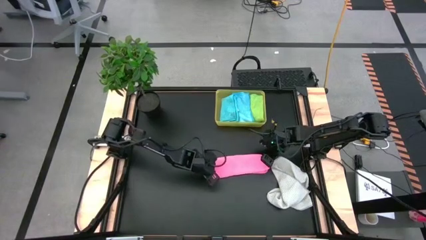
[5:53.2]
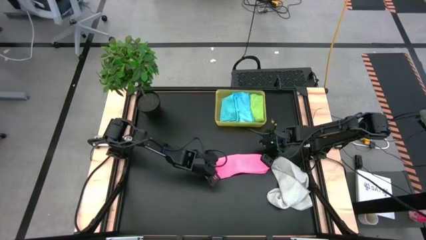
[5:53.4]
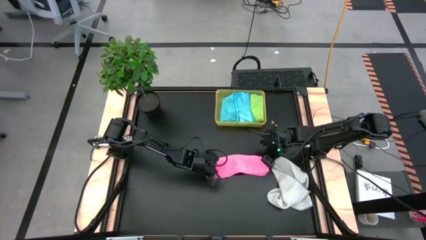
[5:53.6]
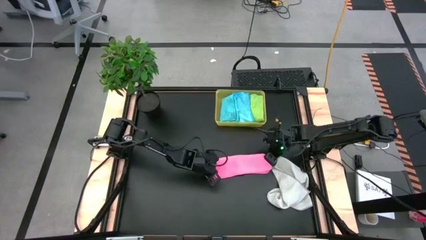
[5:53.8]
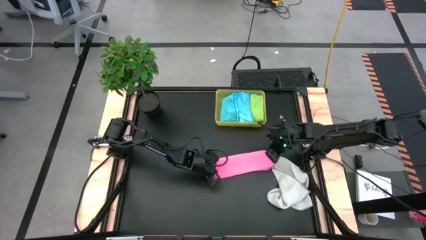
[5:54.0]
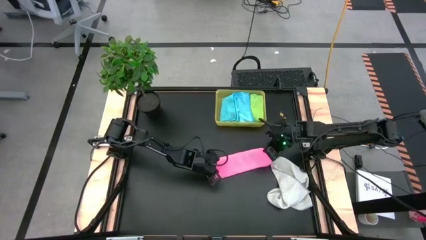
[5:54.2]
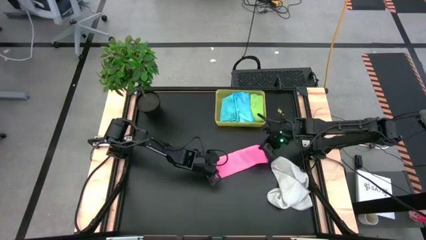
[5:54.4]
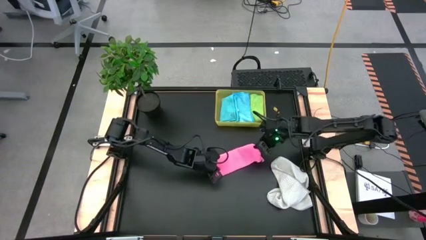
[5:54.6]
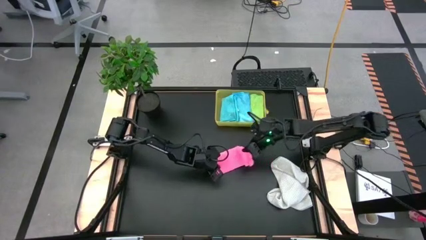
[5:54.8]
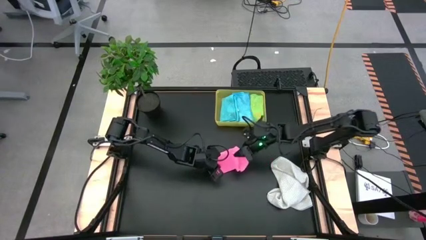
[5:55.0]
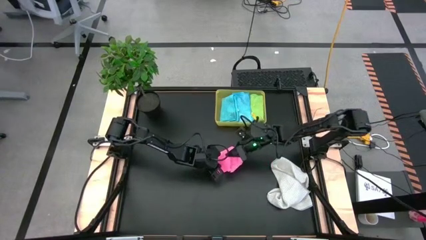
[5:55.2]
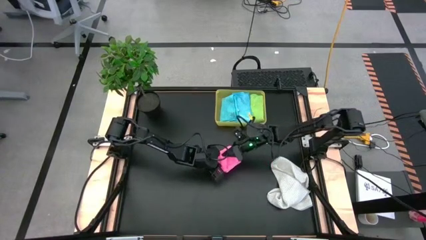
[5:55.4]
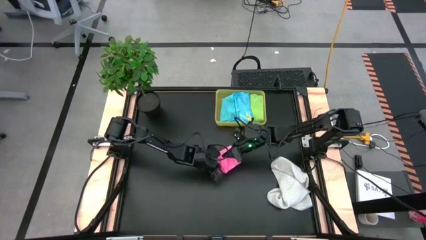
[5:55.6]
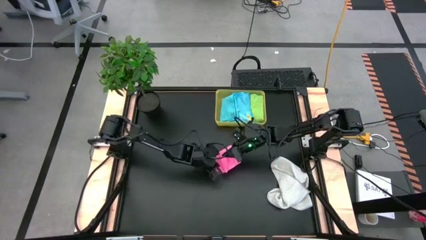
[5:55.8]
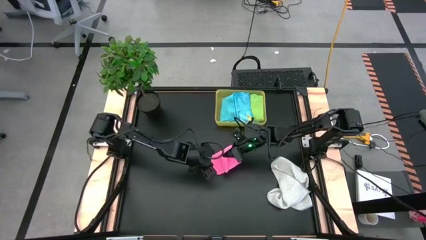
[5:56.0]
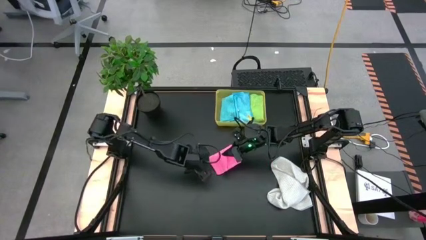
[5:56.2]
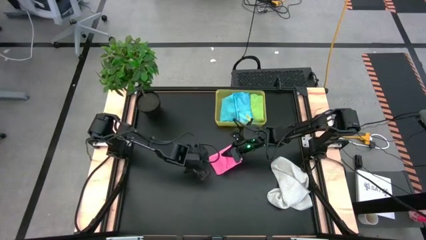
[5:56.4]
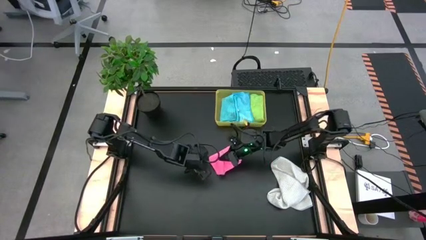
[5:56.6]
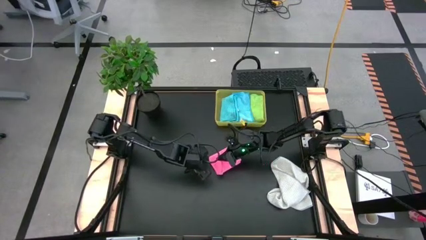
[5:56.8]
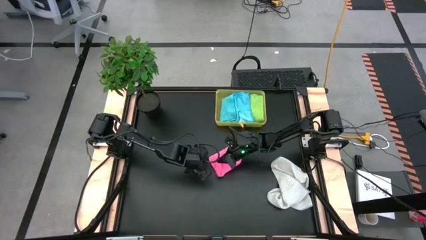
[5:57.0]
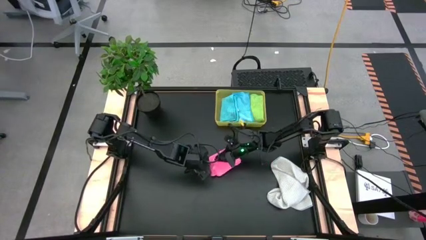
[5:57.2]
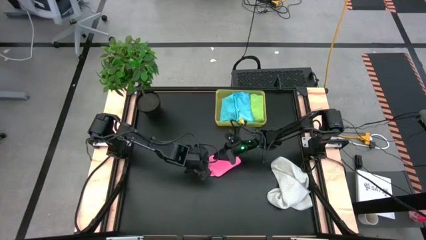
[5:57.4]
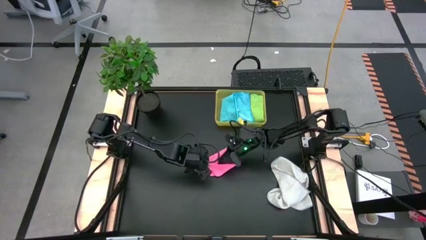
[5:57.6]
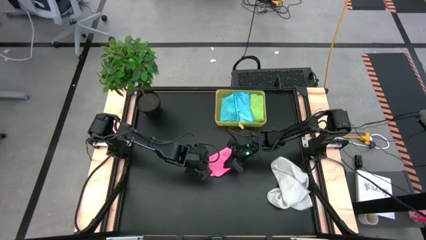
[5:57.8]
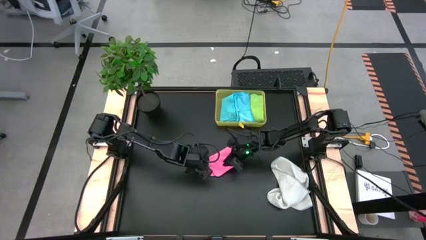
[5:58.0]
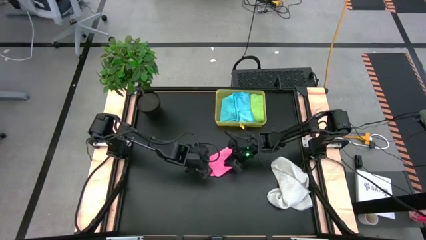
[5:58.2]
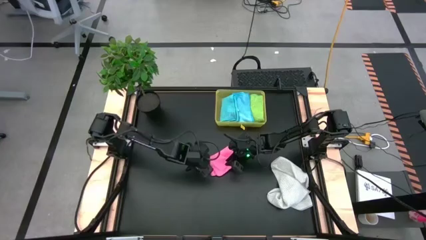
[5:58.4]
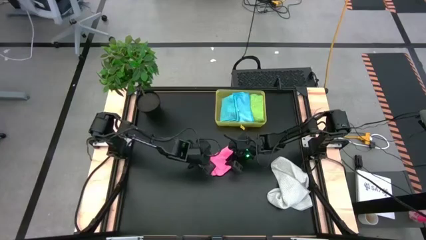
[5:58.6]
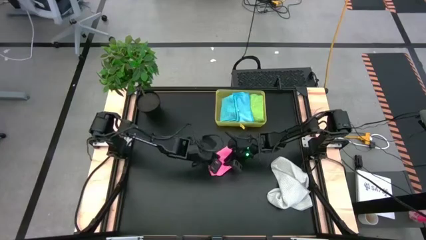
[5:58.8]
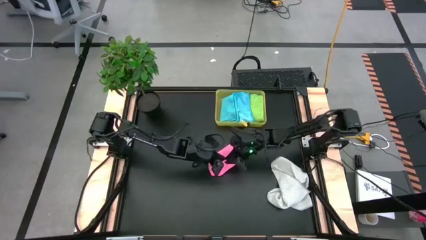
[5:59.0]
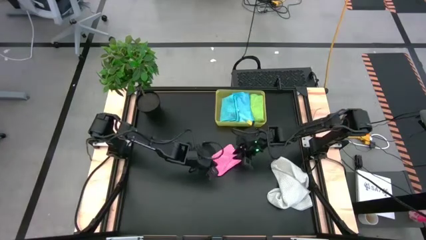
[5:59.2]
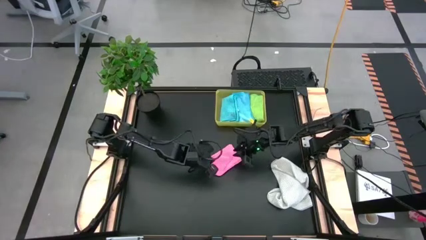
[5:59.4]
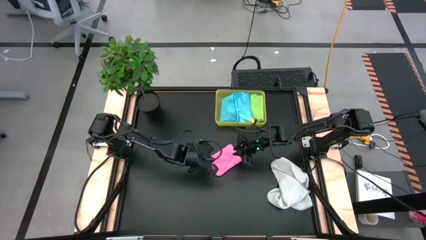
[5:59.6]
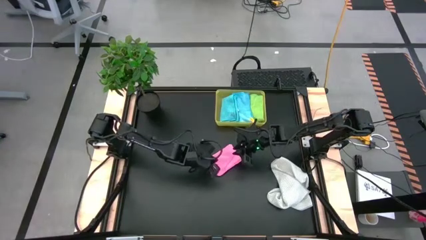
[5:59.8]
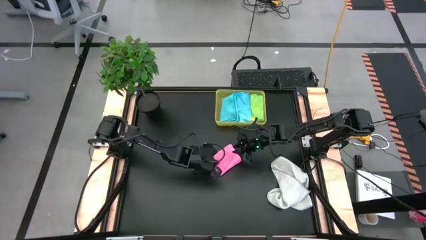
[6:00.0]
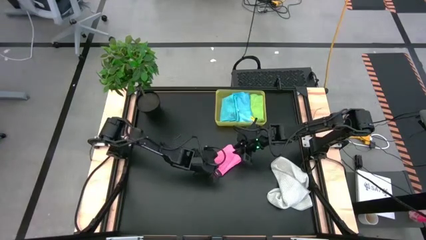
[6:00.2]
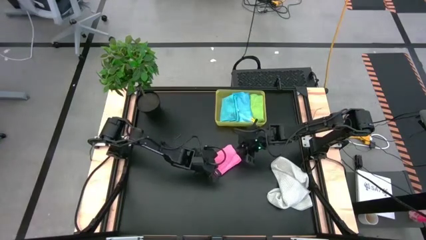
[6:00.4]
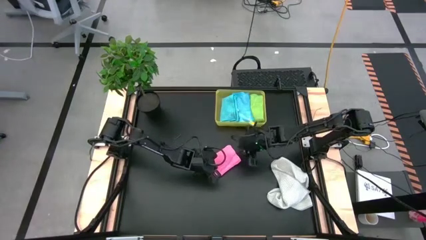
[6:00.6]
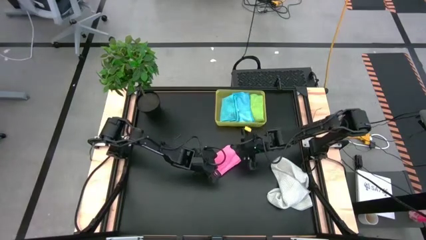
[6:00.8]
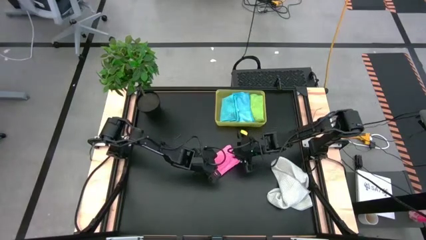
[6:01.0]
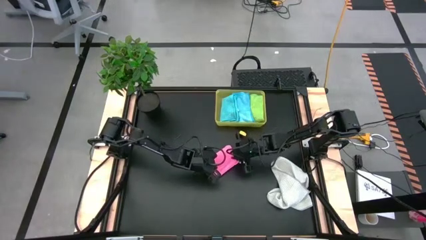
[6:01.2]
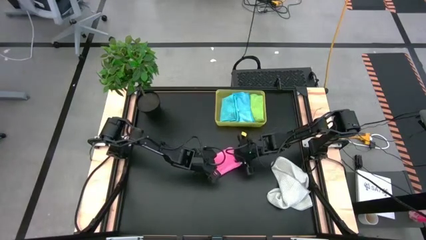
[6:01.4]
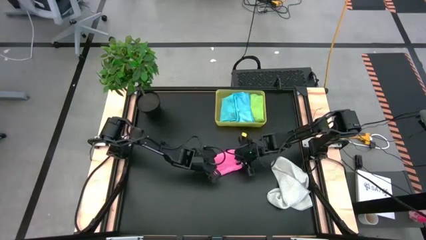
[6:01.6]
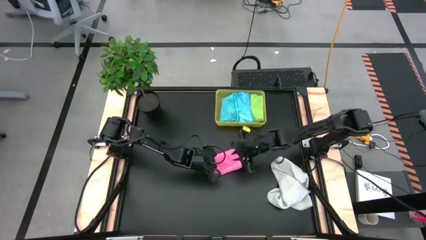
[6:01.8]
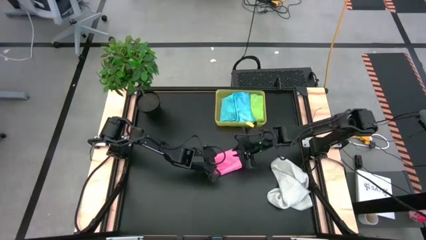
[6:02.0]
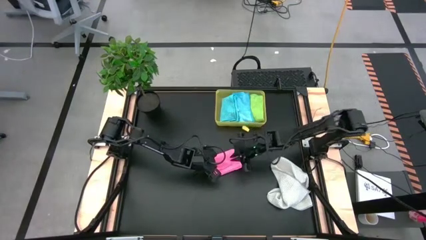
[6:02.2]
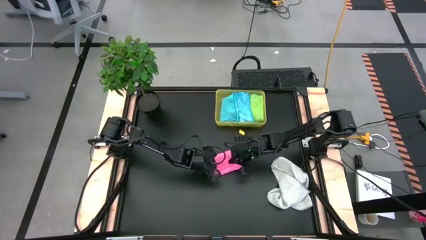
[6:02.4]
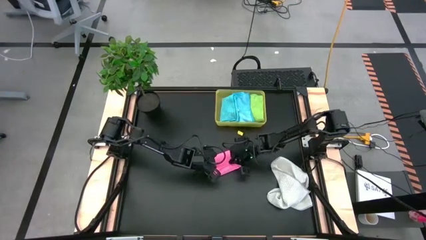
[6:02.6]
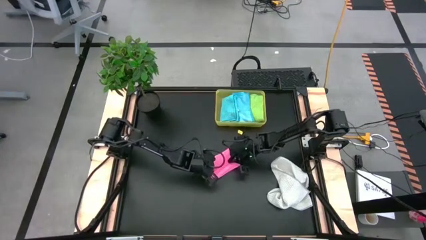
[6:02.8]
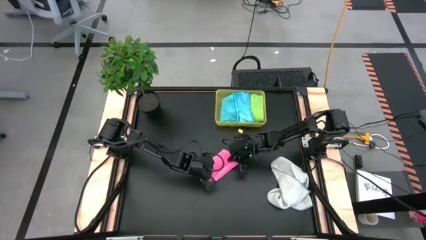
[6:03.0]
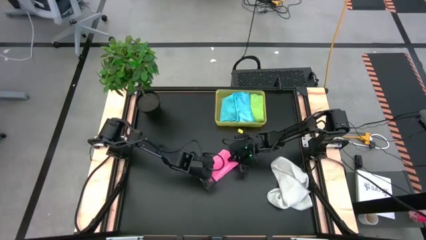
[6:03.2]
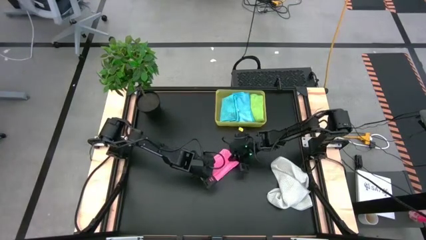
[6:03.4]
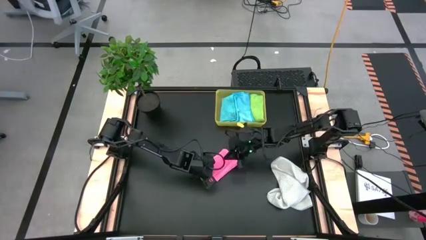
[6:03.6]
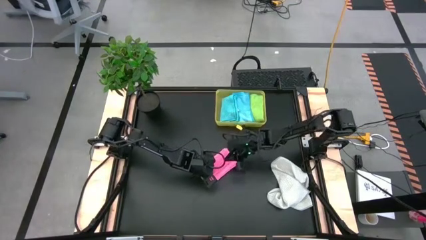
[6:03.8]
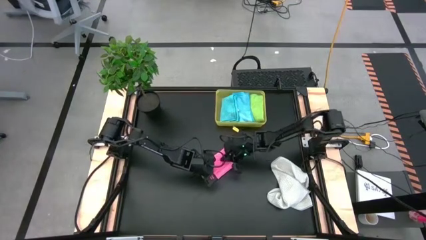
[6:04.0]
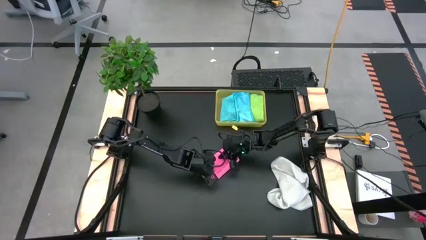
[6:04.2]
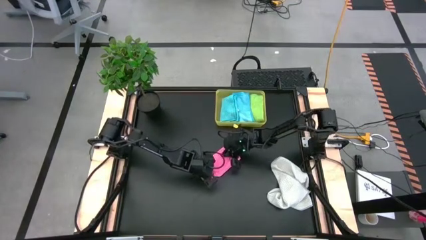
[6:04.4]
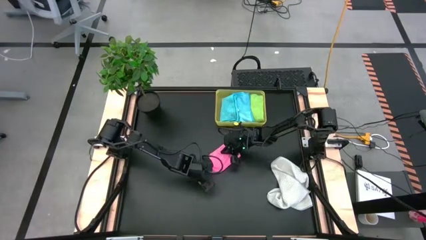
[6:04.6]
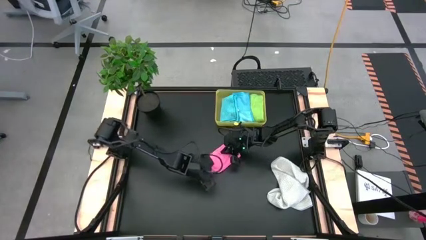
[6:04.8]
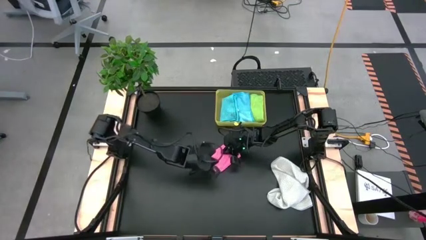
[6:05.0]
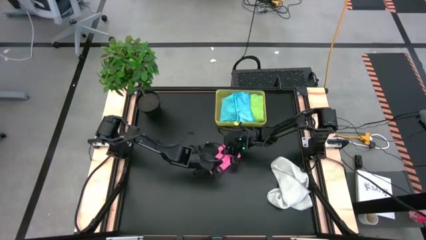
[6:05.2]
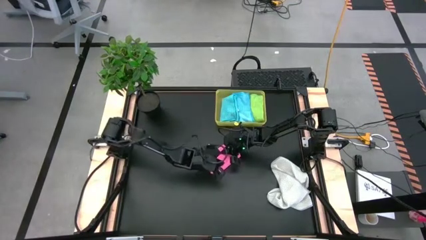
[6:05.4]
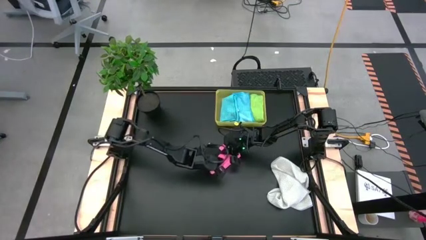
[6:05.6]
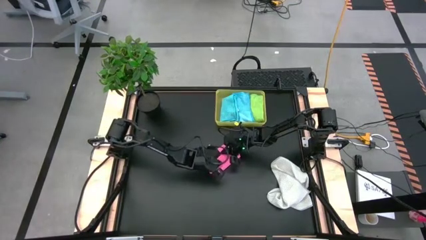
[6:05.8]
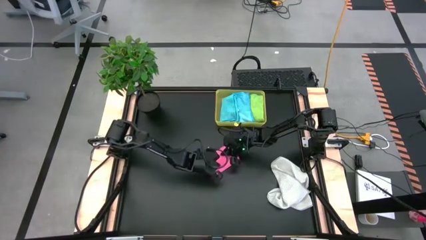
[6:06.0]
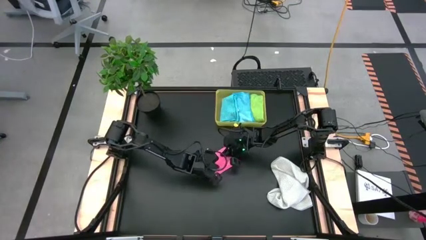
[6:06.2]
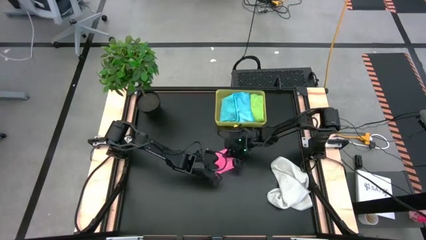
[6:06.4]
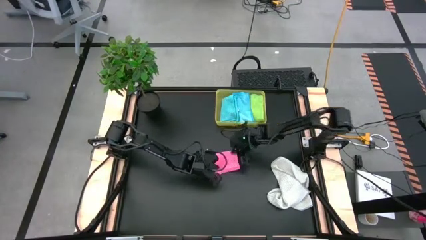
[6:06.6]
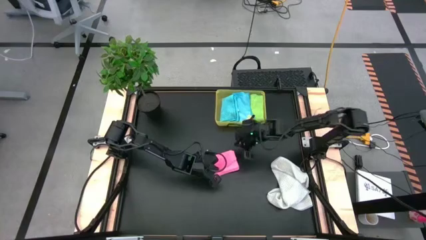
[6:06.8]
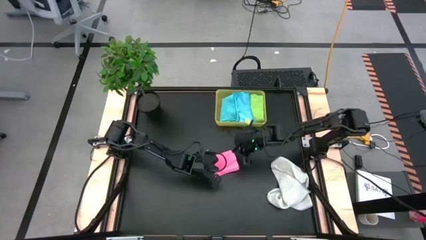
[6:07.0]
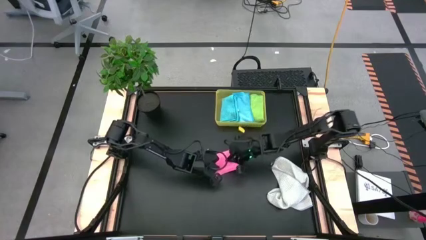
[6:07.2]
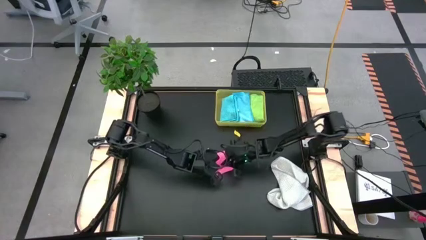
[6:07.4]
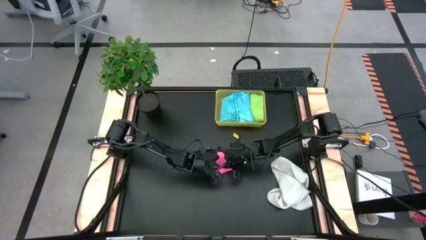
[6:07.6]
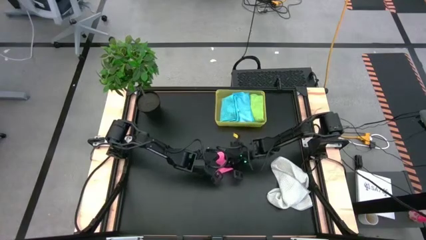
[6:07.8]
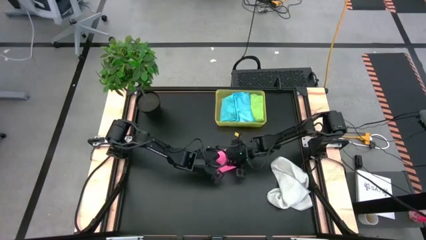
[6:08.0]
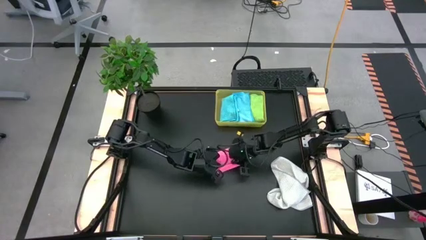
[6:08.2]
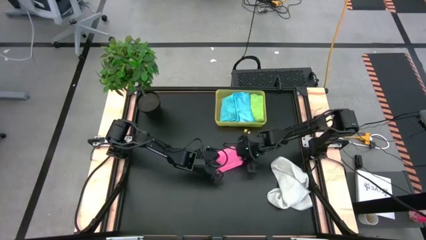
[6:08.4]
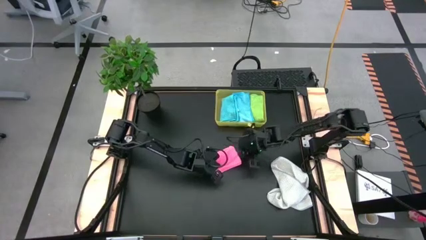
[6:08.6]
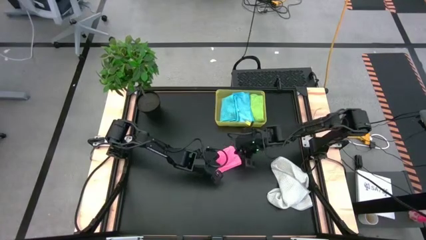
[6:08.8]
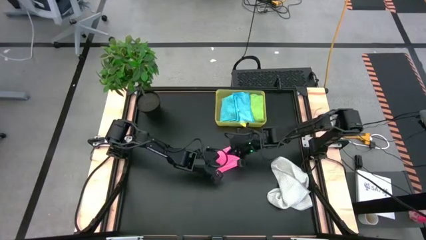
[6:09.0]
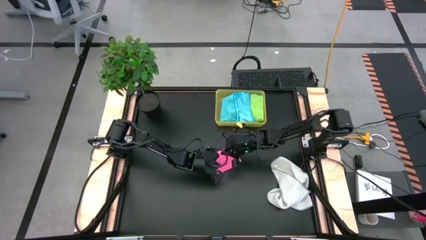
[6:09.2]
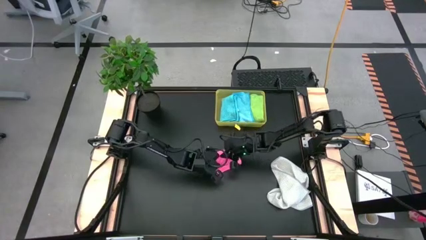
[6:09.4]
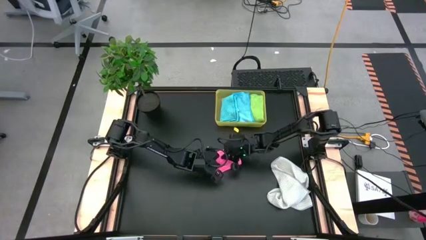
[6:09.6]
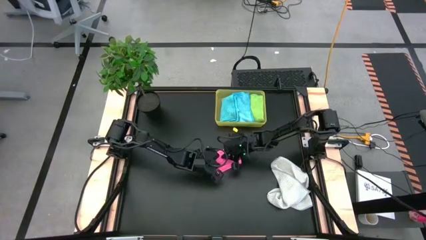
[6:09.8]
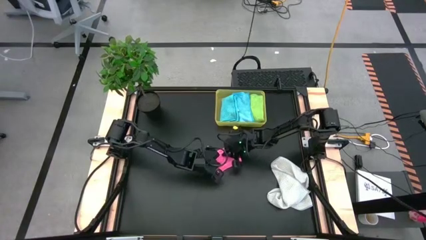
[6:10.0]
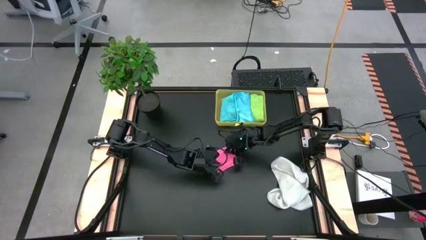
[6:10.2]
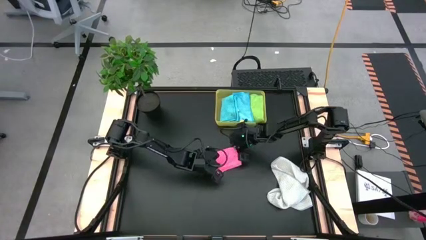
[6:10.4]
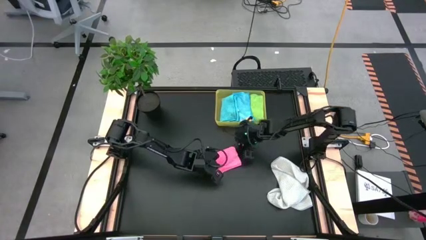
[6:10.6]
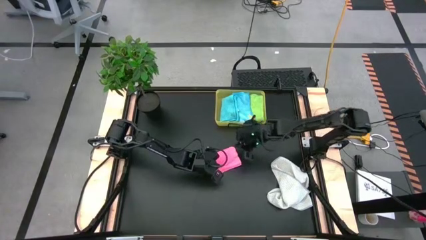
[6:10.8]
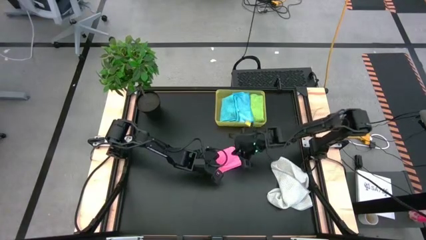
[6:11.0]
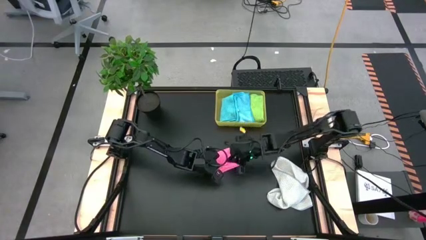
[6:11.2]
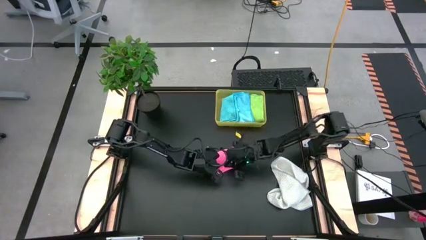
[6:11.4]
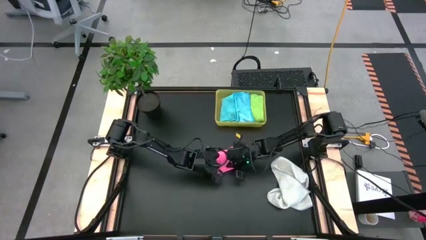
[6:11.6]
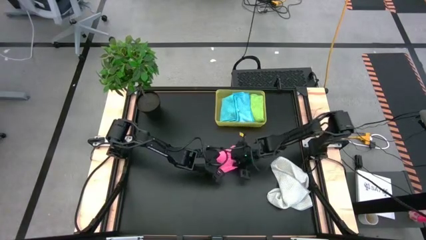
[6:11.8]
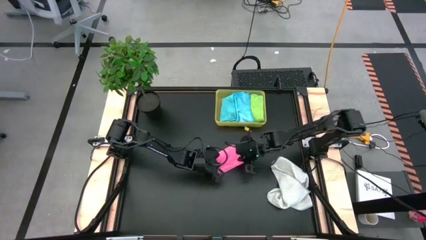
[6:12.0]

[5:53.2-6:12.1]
Task: Fold microfiber towels
Fold the pink microfiber cloth
